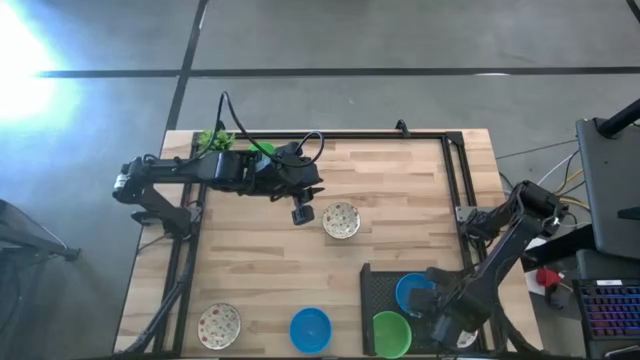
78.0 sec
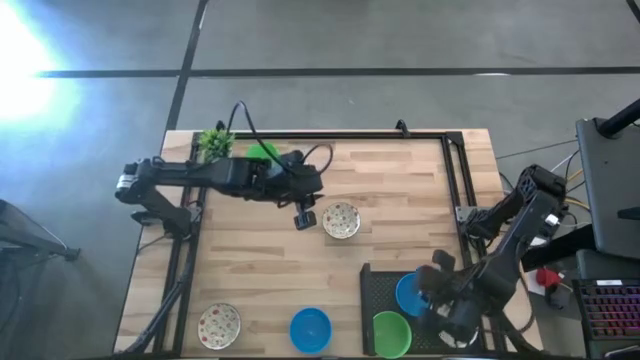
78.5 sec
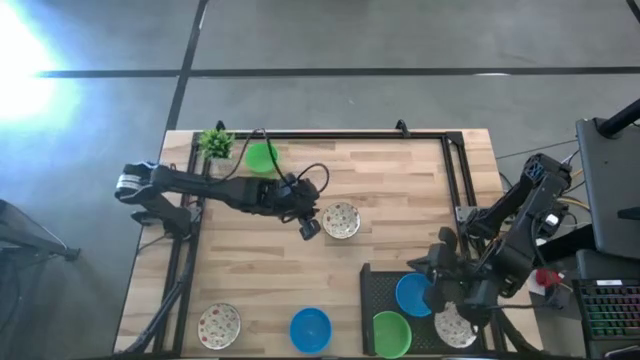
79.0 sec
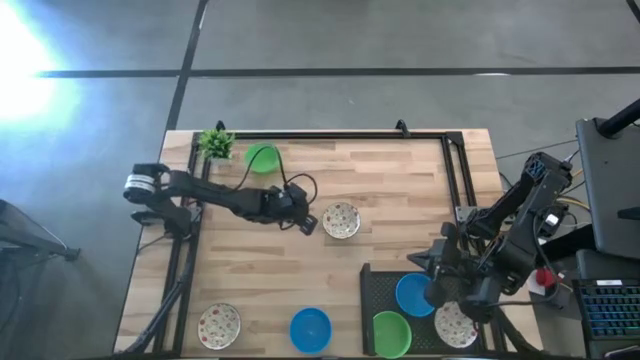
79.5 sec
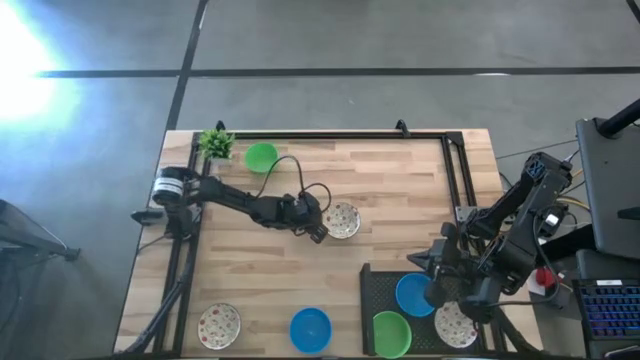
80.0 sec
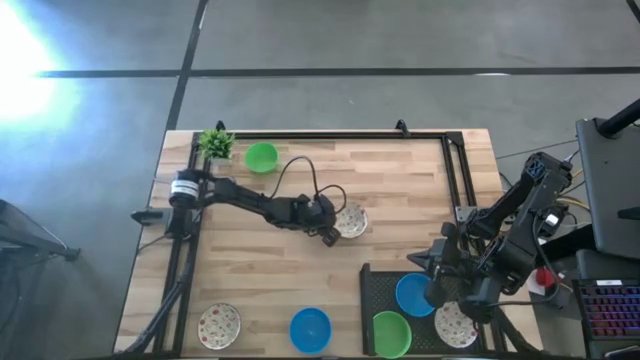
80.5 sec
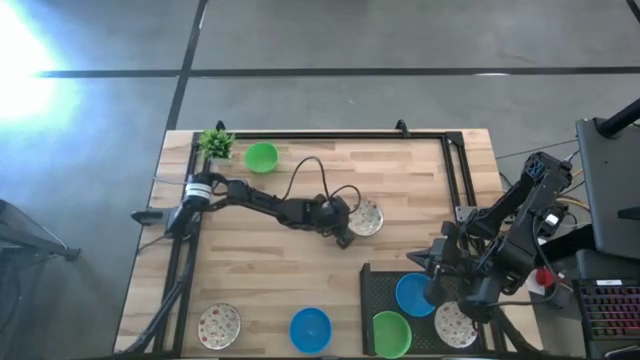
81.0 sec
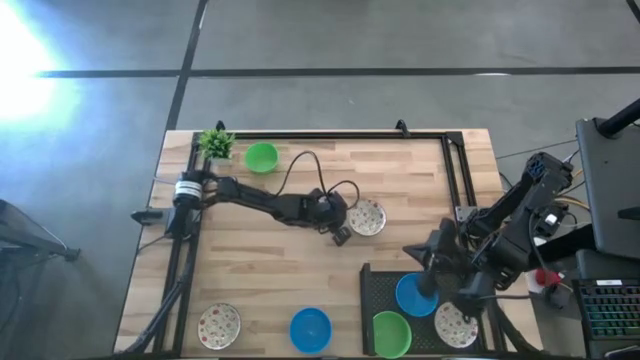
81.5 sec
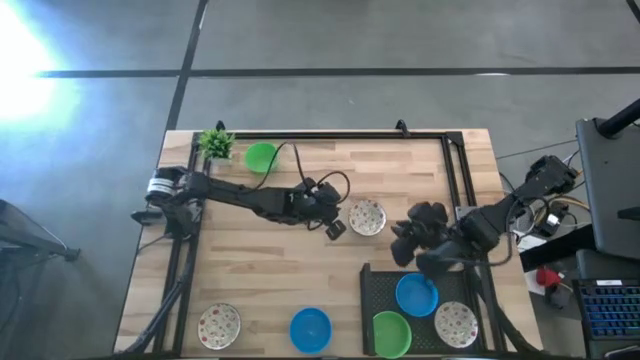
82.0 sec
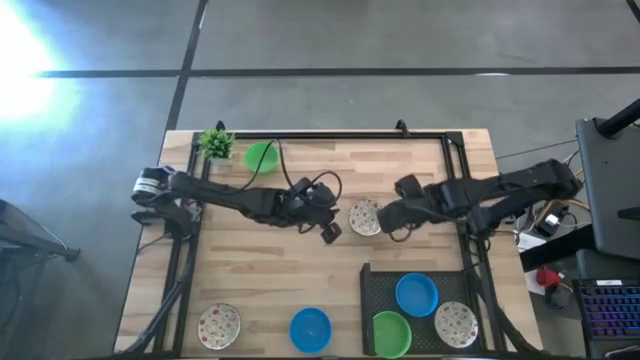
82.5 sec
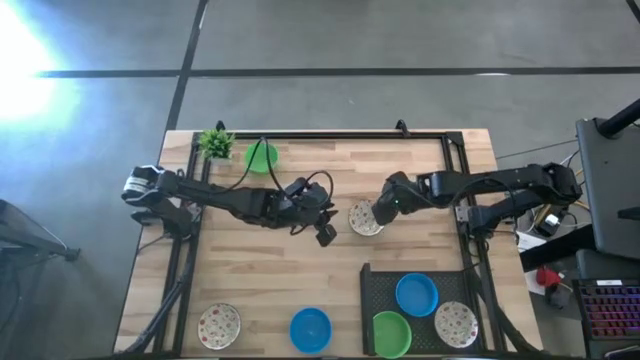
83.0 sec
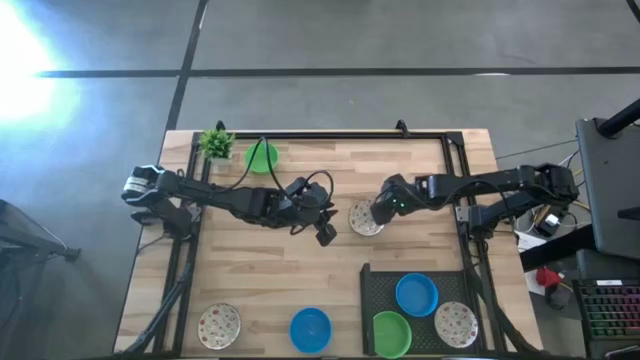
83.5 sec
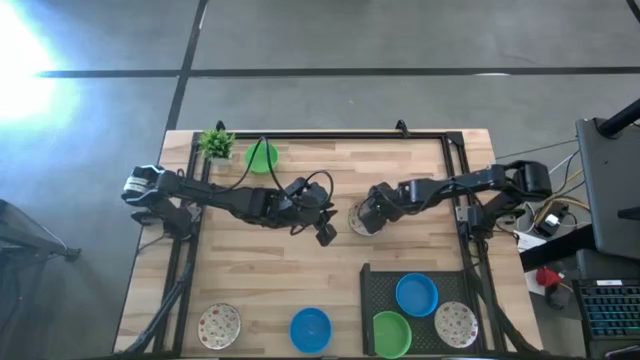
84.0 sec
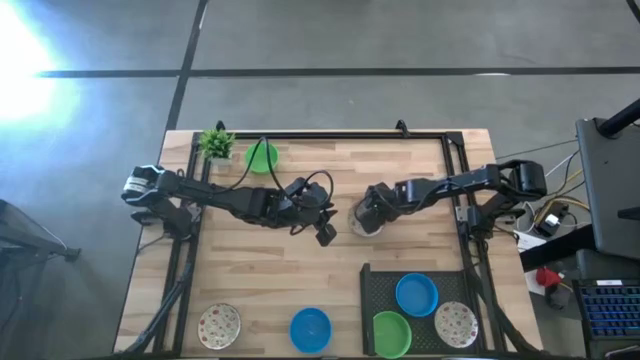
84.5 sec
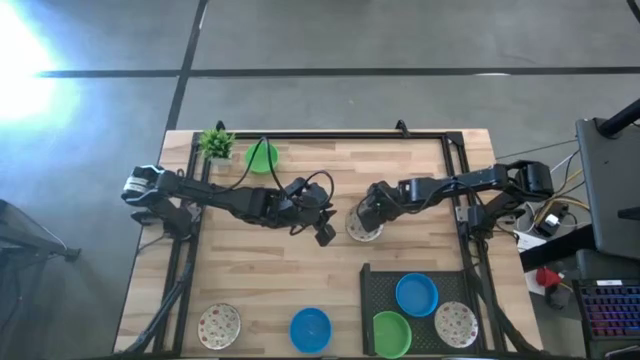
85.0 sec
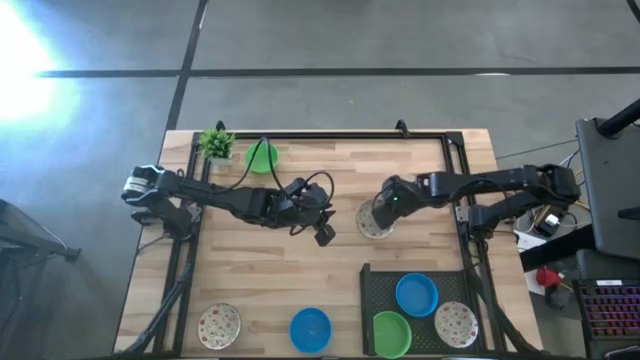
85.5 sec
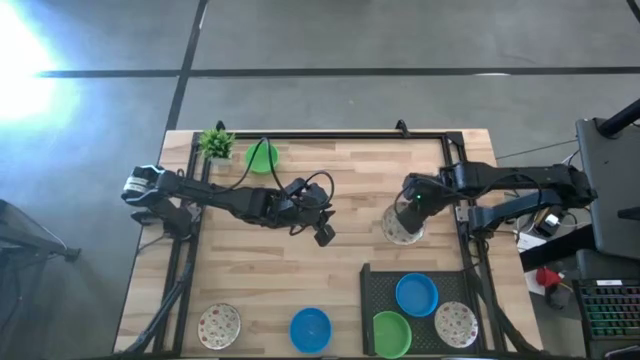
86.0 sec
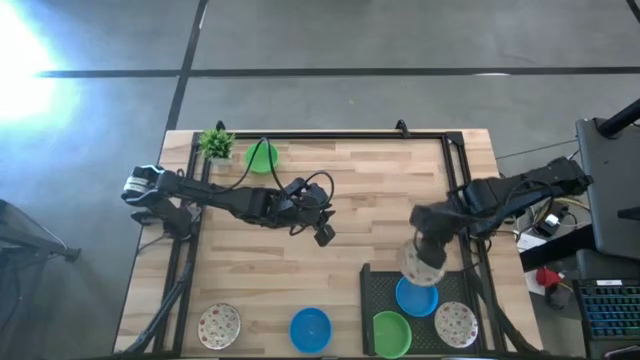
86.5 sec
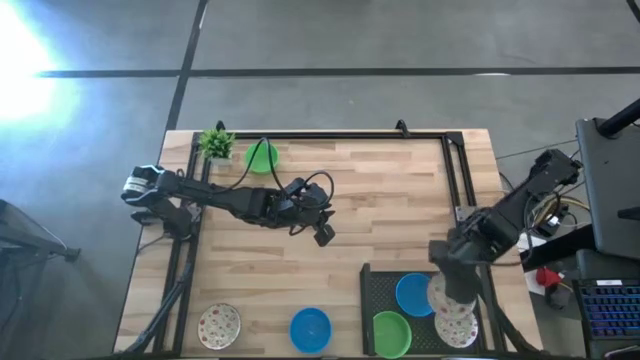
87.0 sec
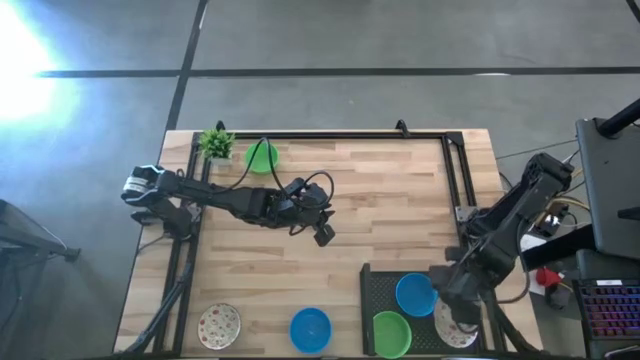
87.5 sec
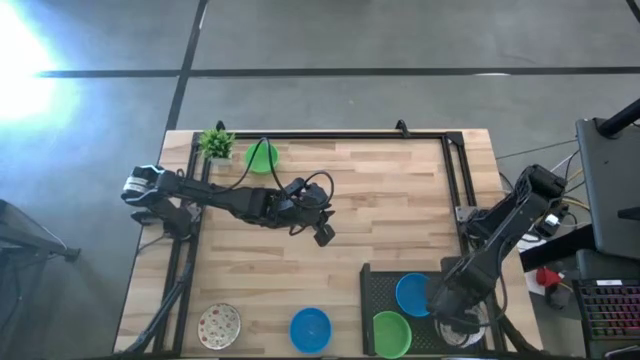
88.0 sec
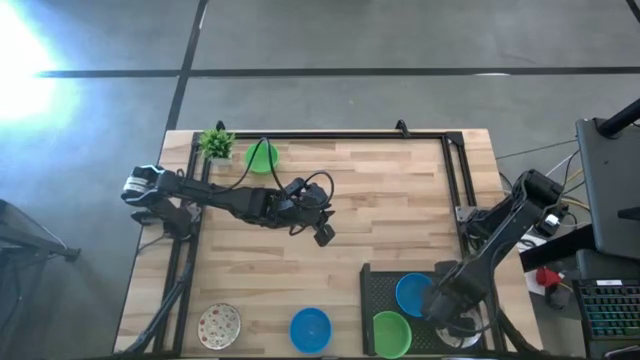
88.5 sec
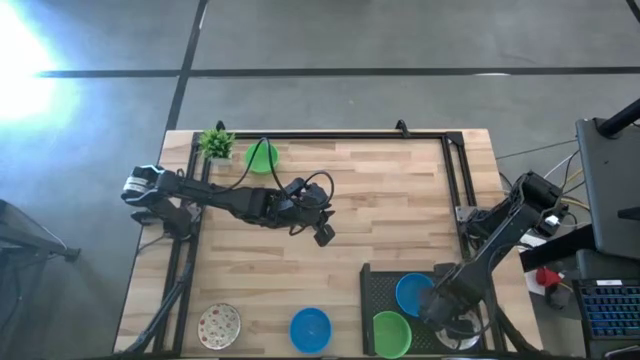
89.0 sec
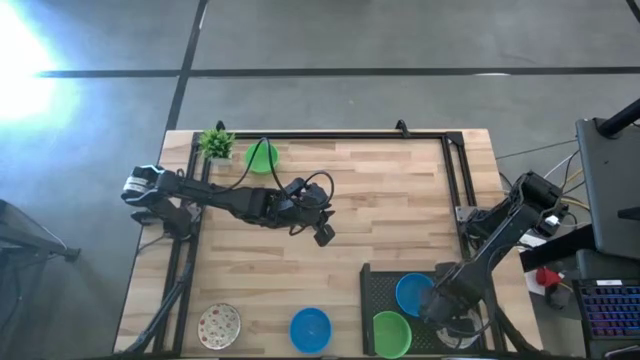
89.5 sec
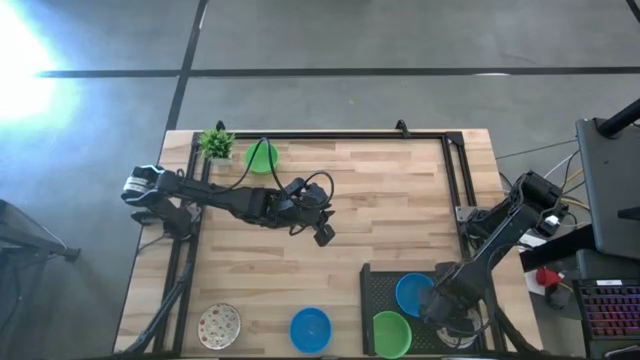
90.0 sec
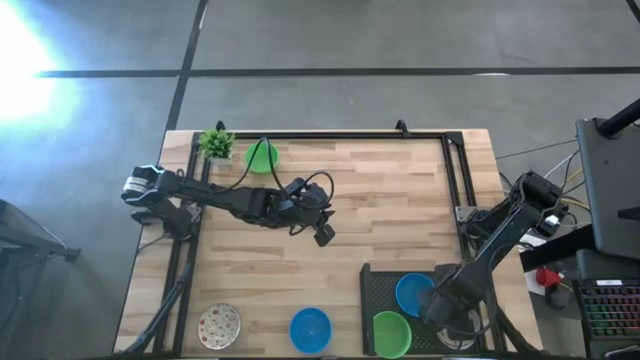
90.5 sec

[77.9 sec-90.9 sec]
Task: Pick & Place Mini bowls
Stack the top white patterned bowl on top of the white patterned bowl on the shelf
